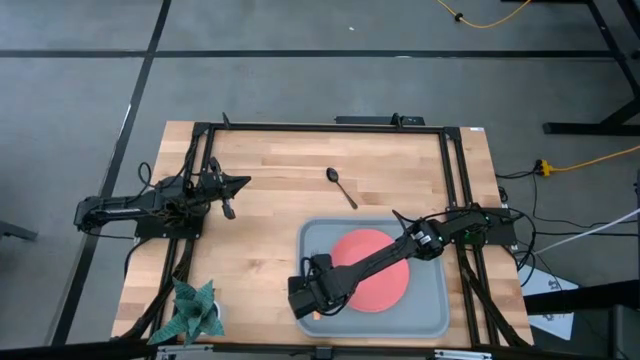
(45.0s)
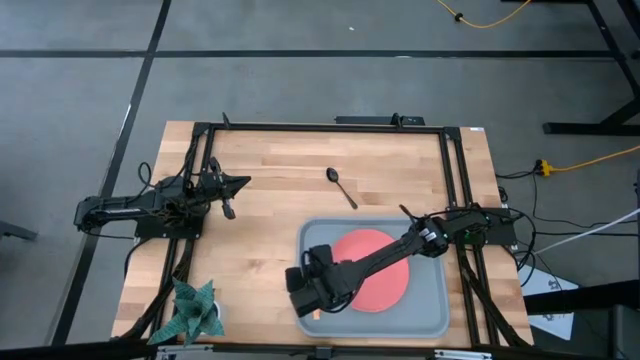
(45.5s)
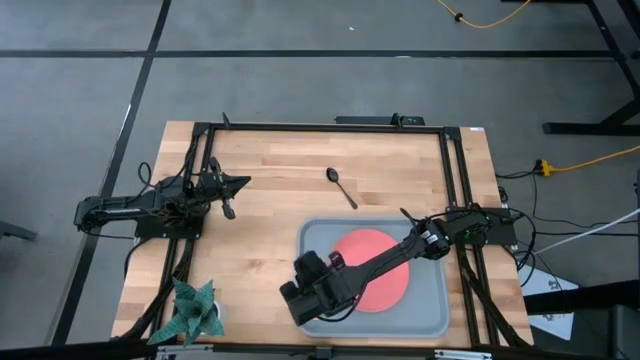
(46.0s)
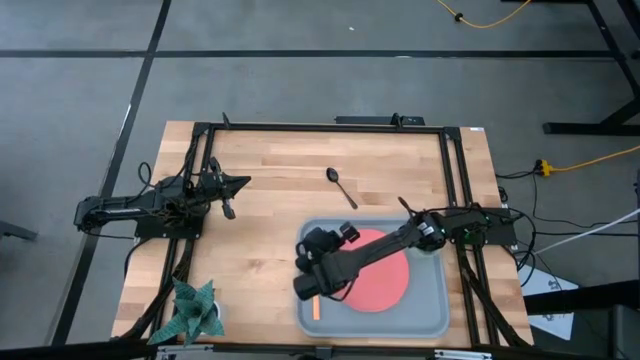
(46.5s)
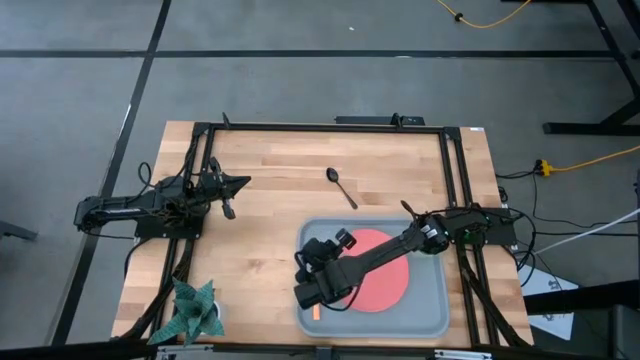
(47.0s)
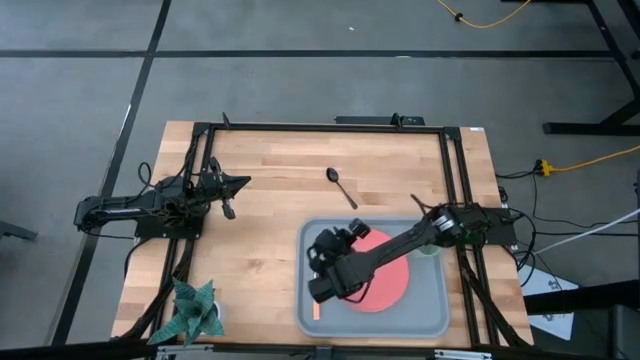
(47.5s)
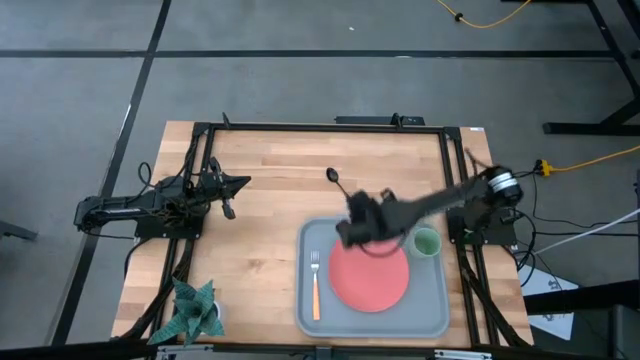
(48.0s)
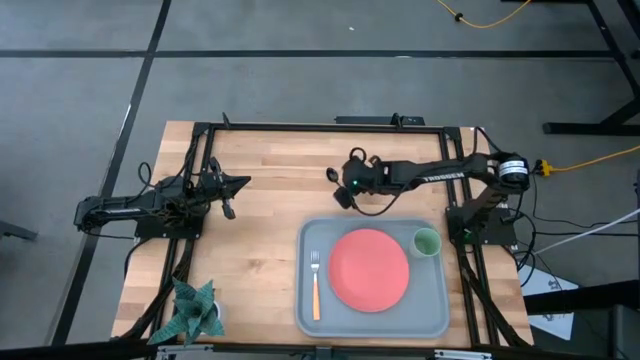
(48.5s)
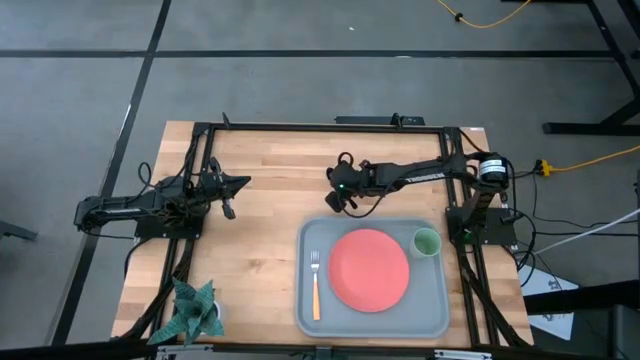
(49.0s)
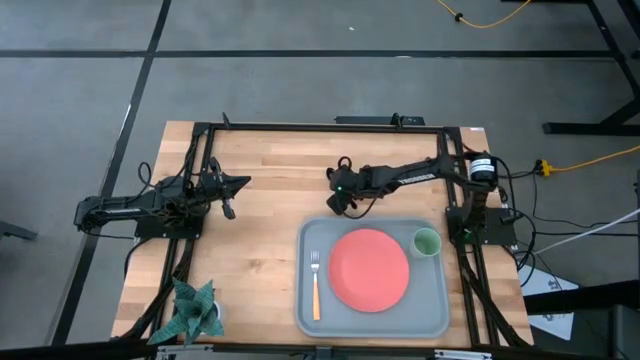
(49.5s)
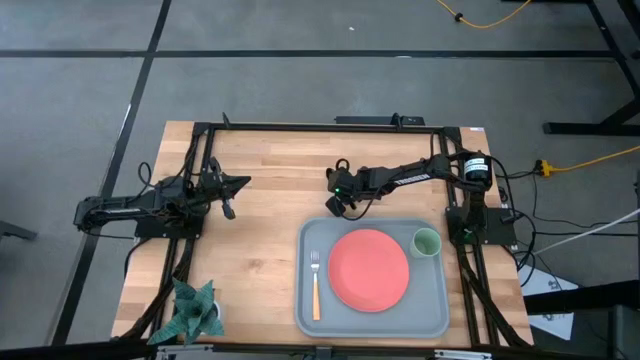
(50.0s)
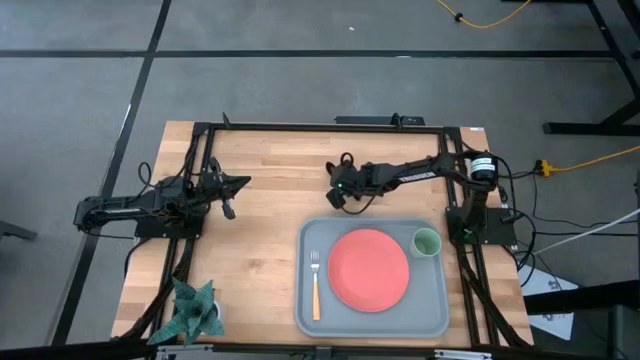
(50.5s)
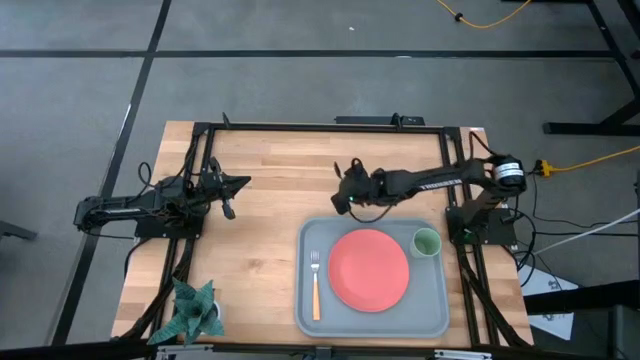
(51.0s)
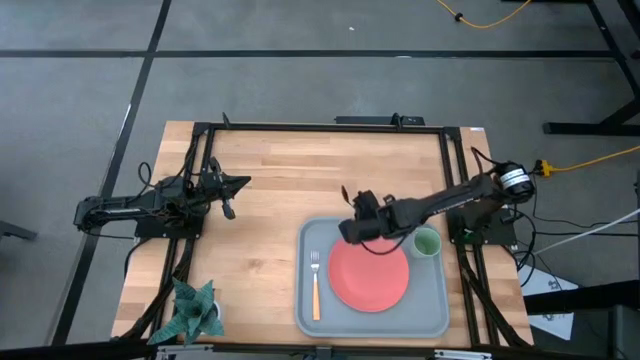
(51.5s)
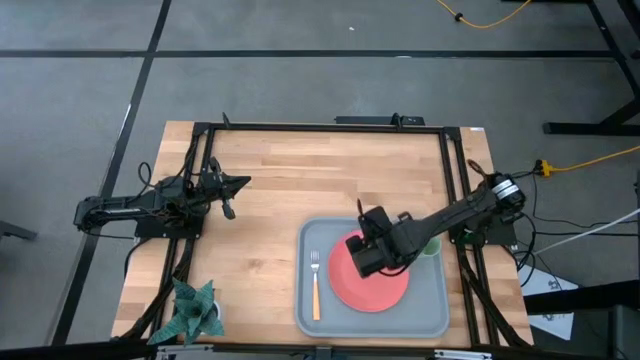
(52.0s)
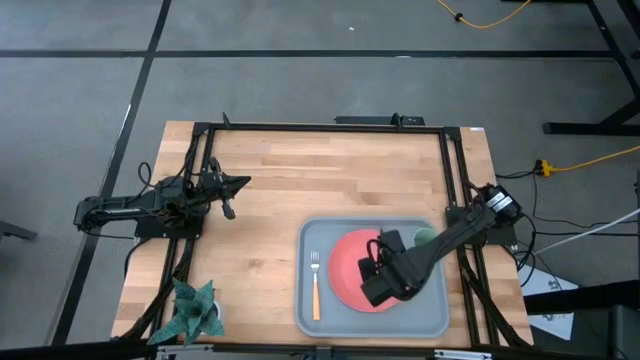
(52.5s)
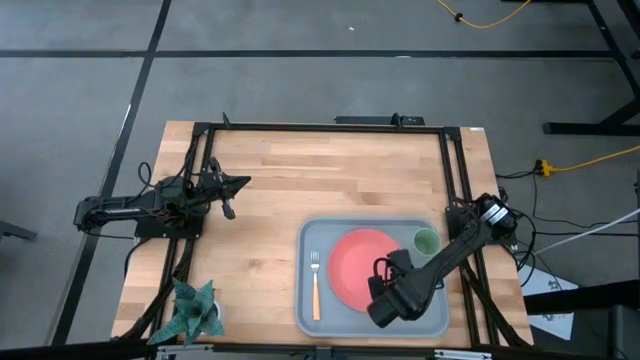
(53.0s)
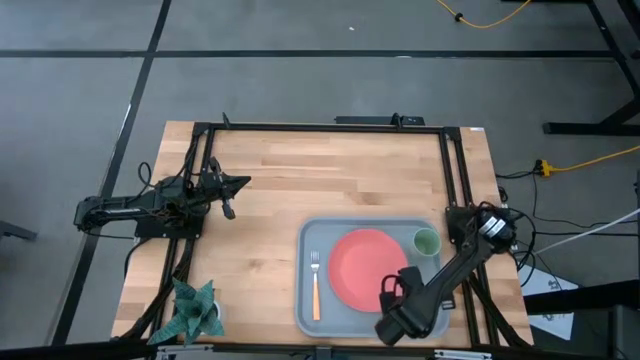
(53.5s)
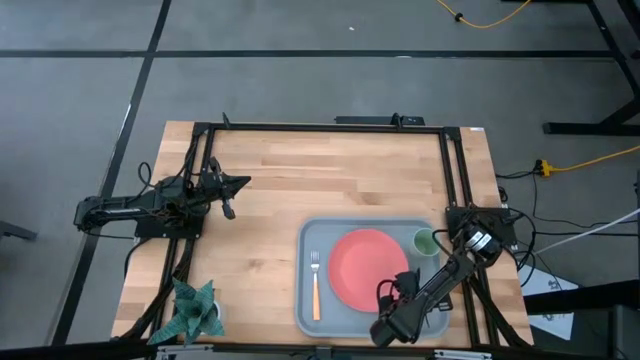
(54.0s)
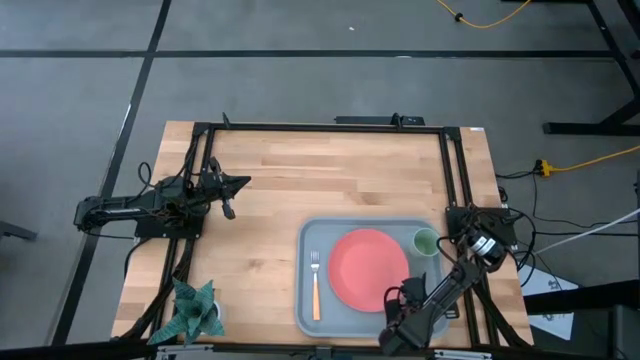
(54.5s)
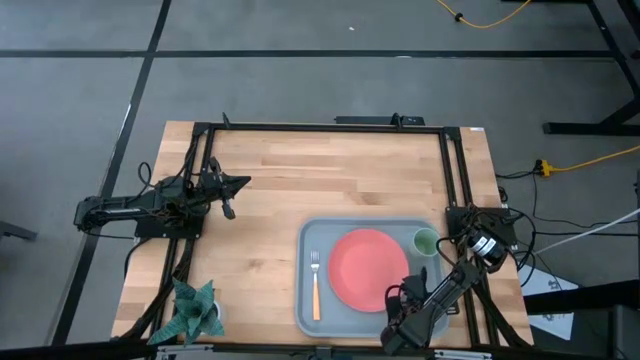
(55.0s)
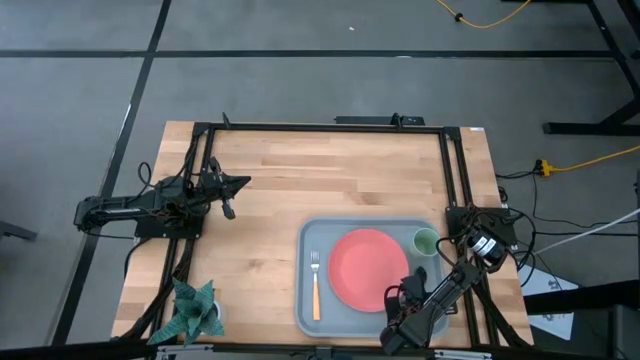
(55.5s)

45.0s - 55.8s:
Task: Pick and place plate/cup/fork/spoon on tray
Put the spoon on the right side of the pink plate on the light blue tray

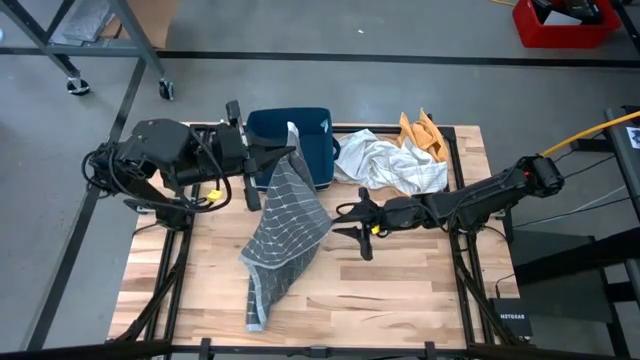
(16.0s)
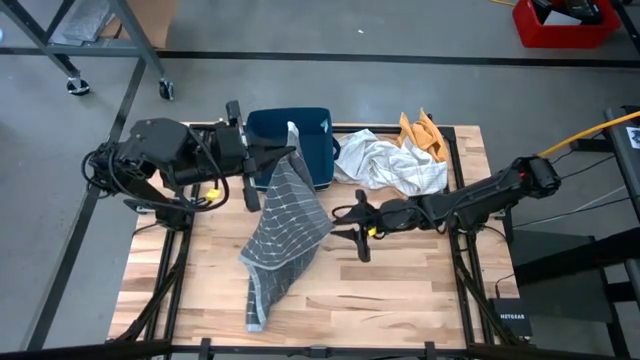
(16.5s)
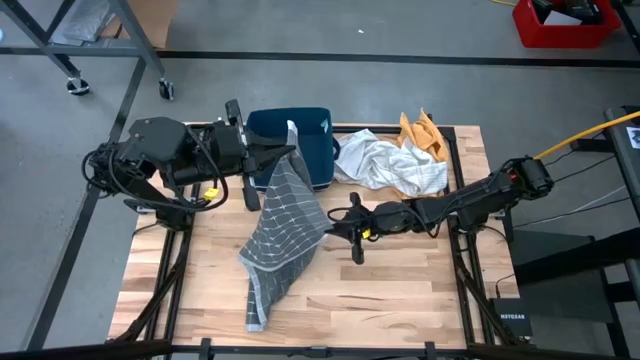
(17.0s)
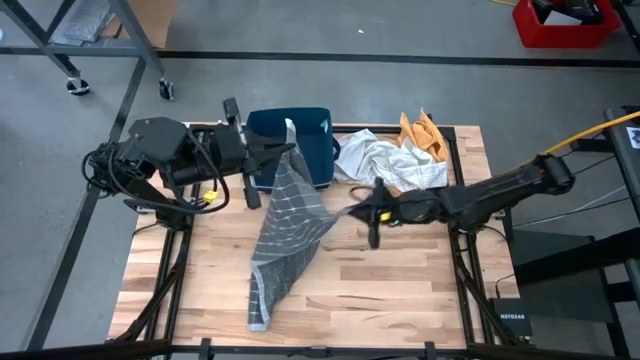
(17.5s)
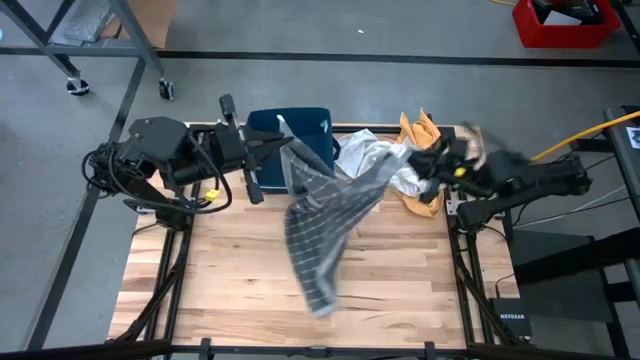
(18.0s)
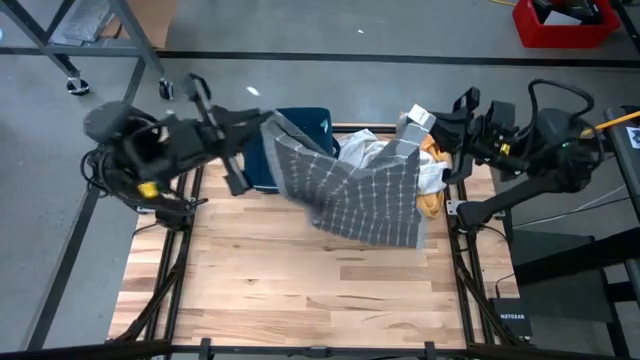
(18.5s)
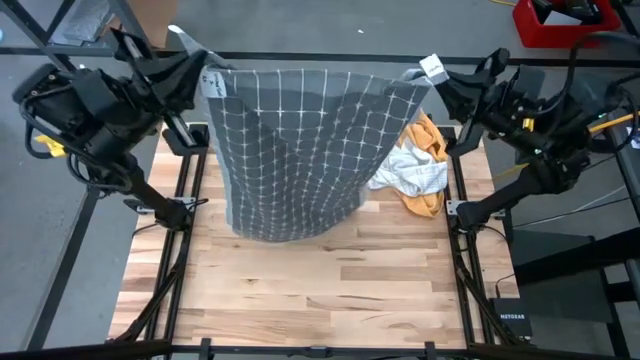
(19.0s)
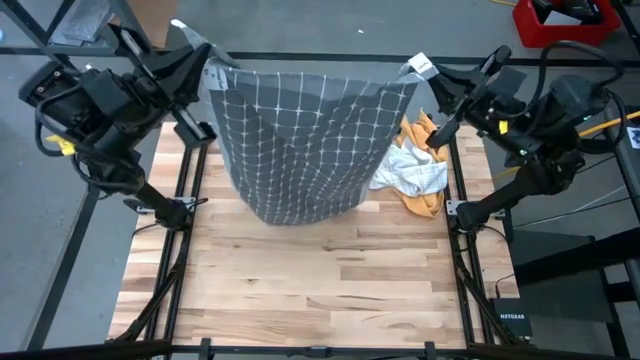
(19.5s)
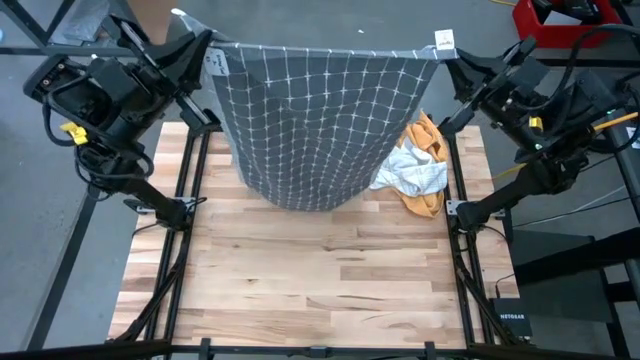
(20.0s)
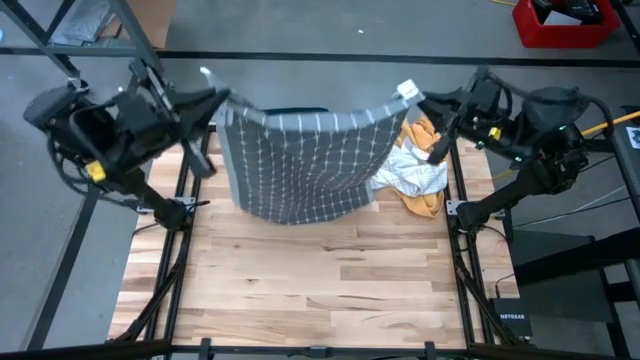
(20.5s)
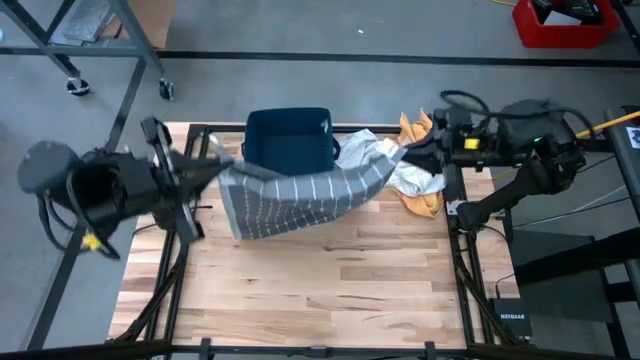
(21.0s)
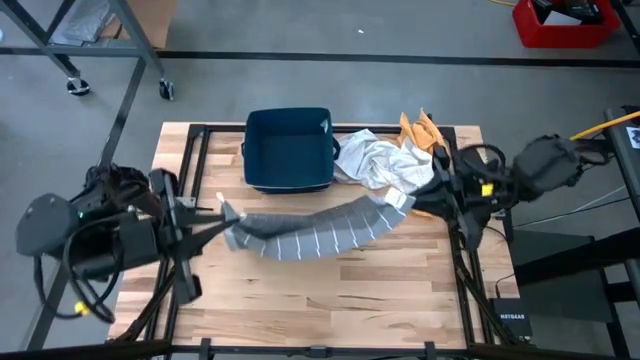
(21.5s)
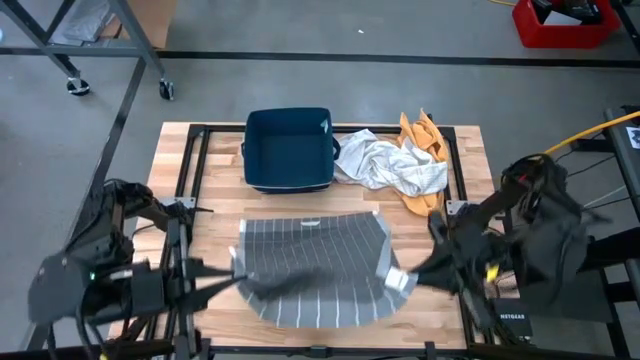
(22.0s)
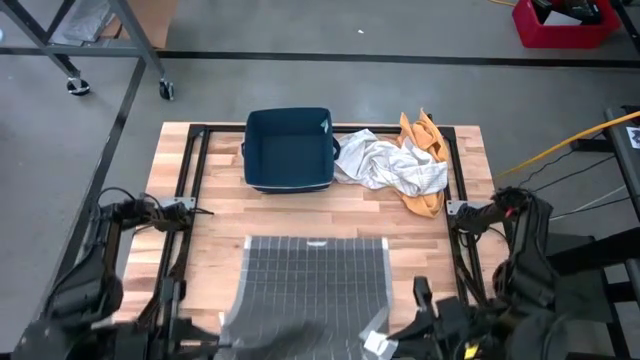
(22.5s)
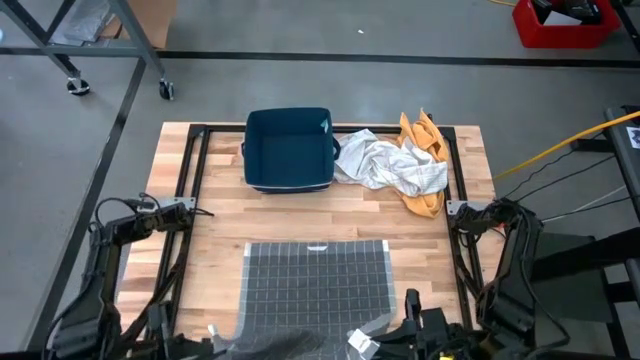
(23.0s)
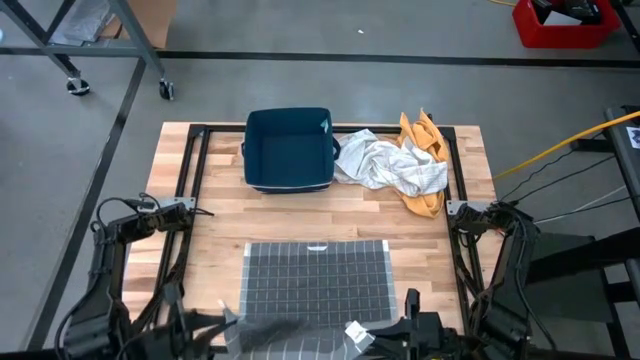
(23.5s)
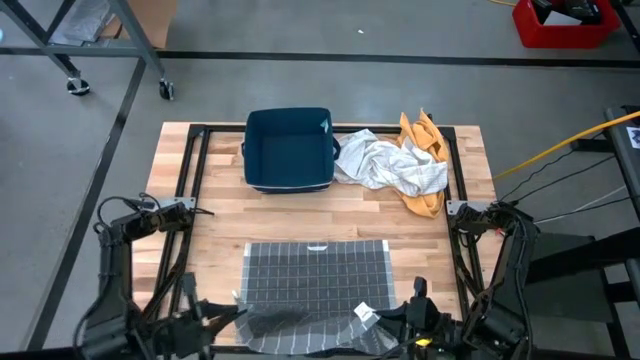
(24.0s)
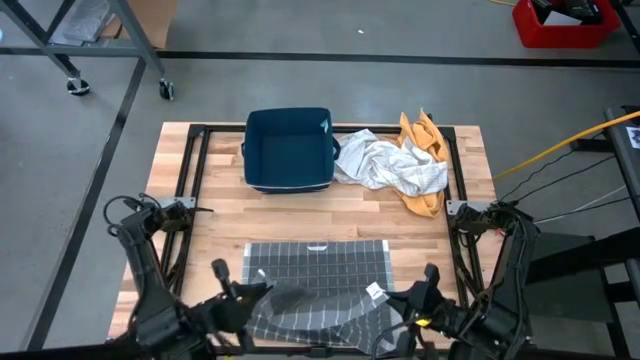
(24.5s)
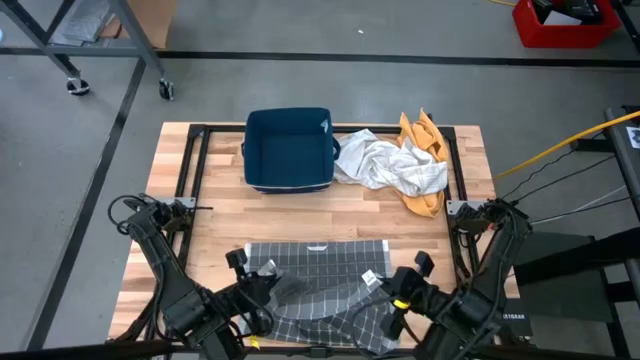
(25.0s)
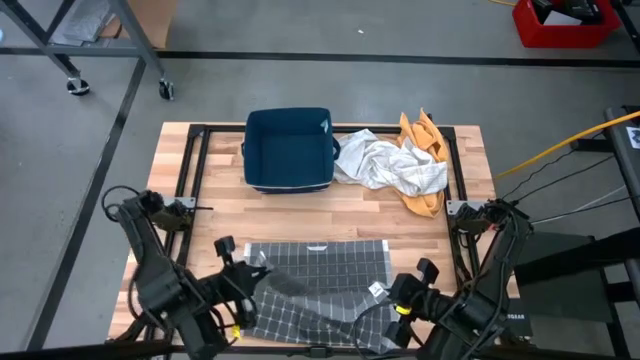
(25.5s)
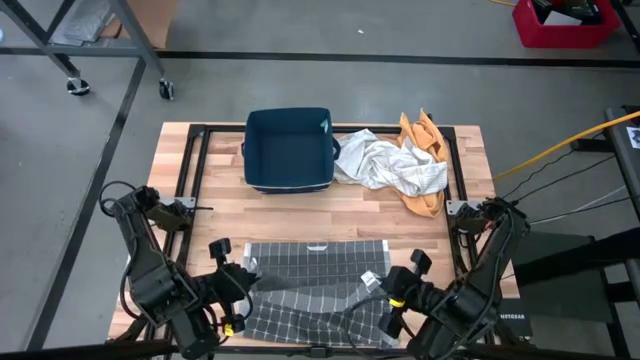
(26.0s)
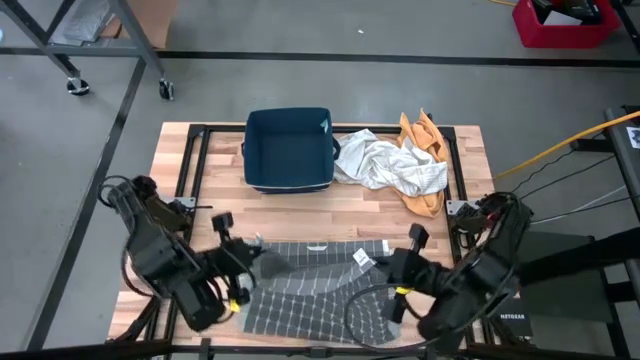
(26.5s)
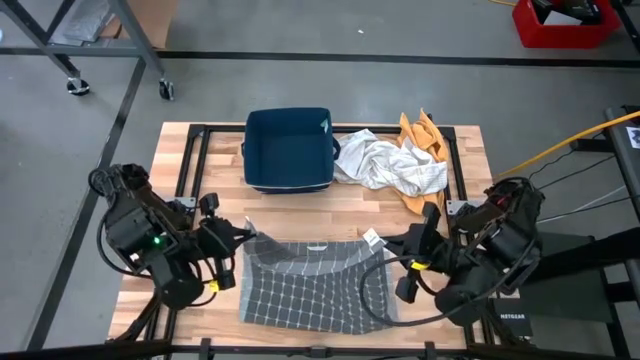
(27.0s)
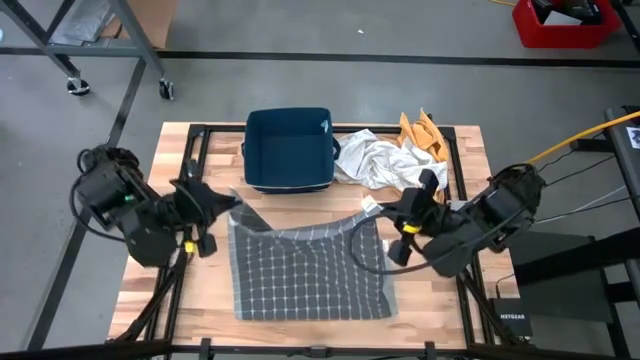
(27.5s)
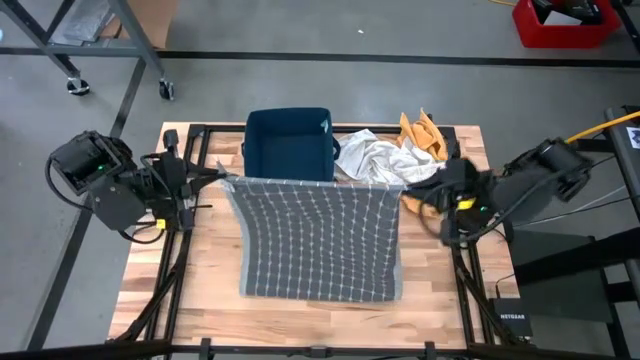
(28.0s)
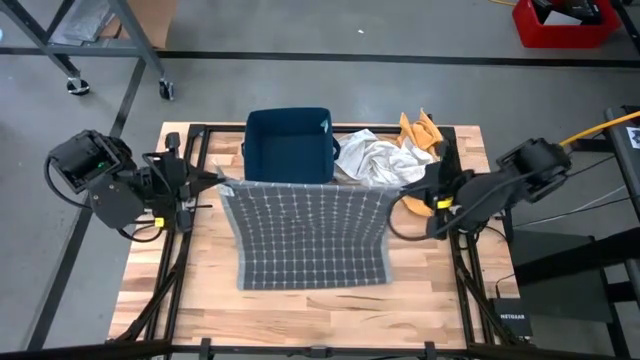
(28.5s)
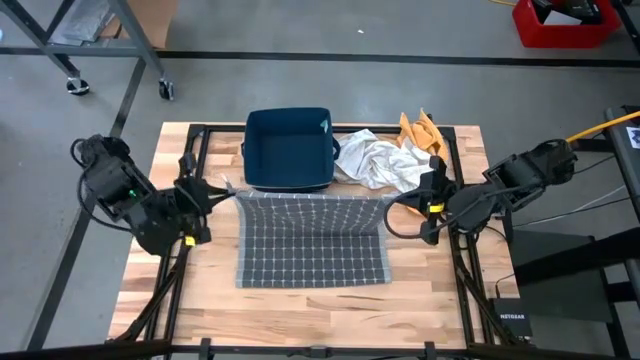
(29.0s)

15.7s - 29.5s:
Task: Fold towel
Fold the gray patterned towel
